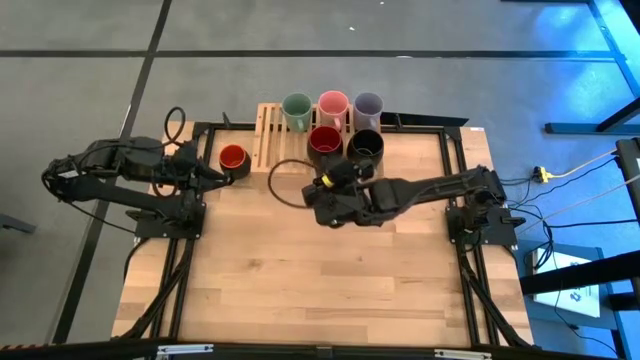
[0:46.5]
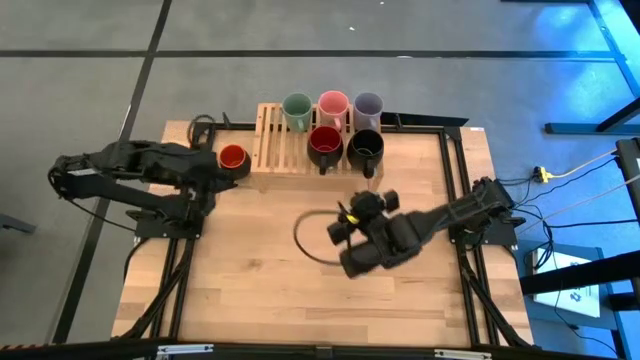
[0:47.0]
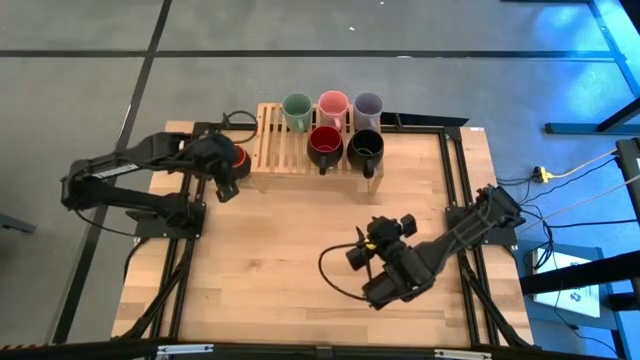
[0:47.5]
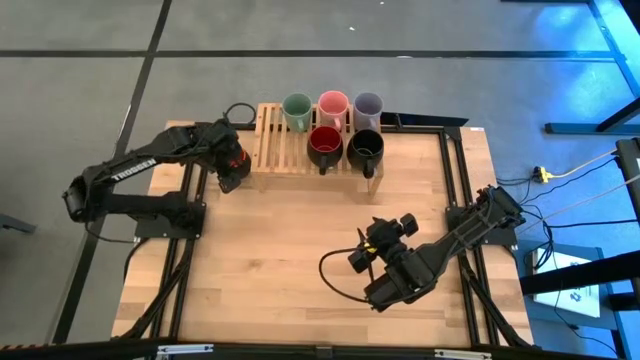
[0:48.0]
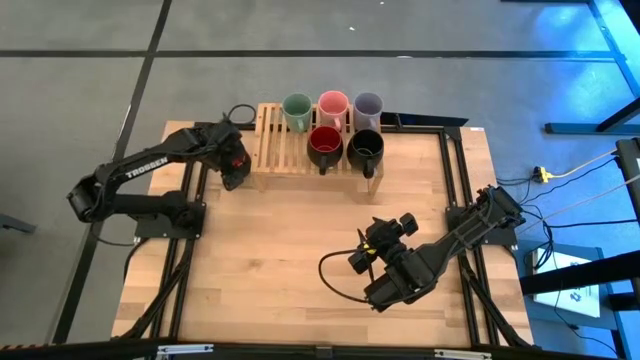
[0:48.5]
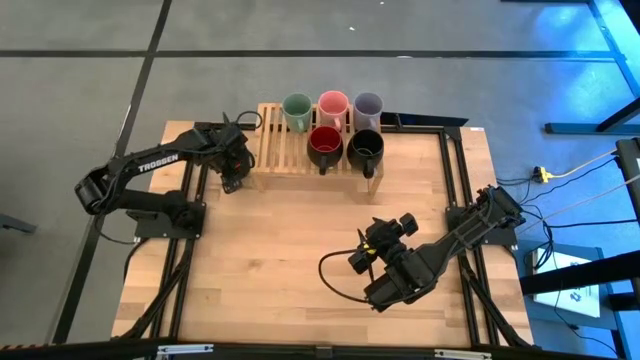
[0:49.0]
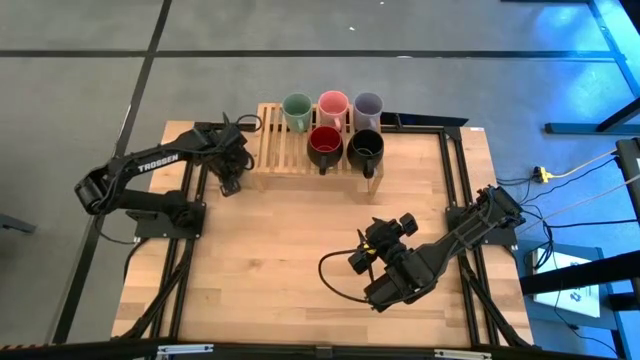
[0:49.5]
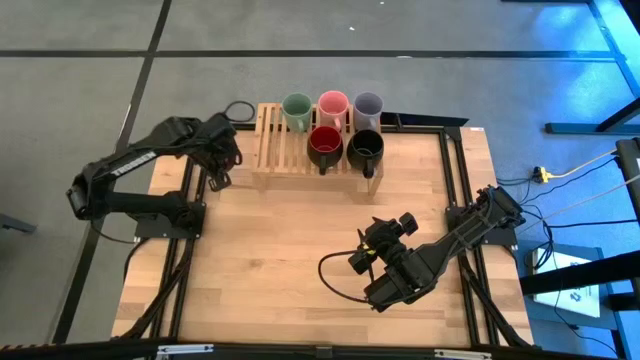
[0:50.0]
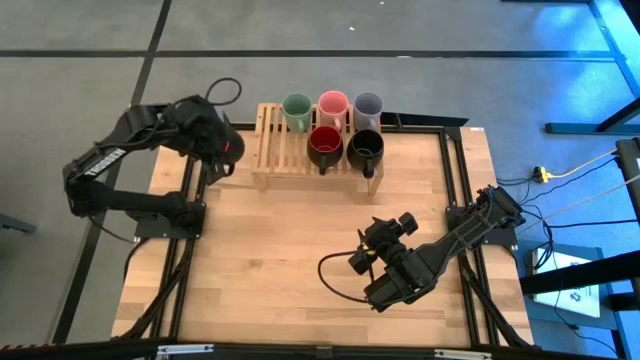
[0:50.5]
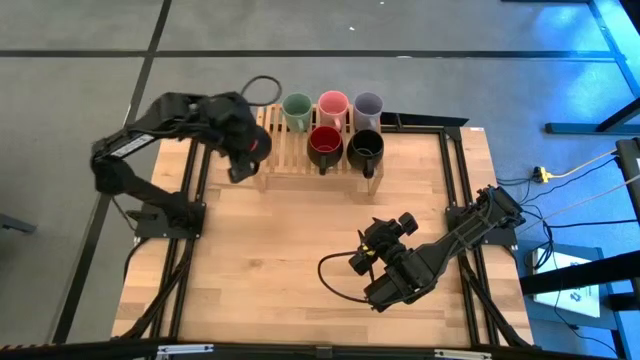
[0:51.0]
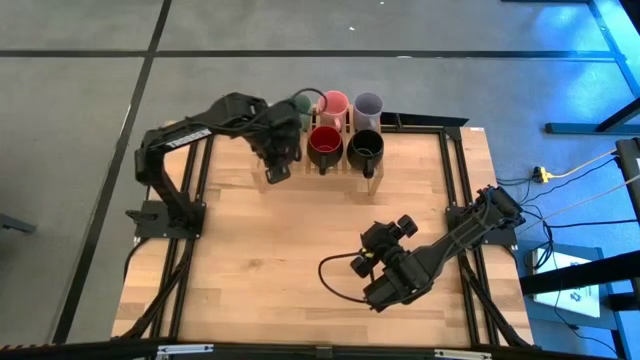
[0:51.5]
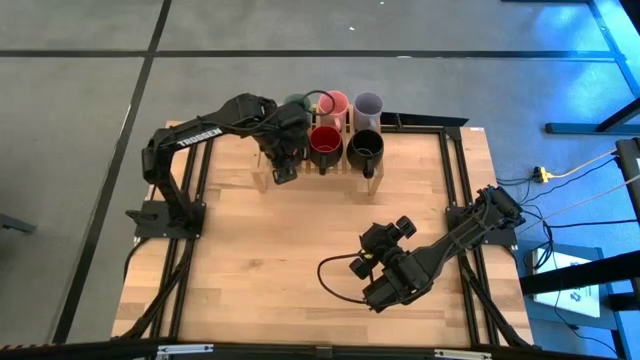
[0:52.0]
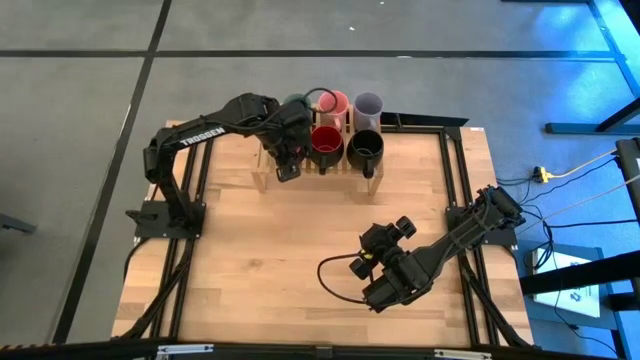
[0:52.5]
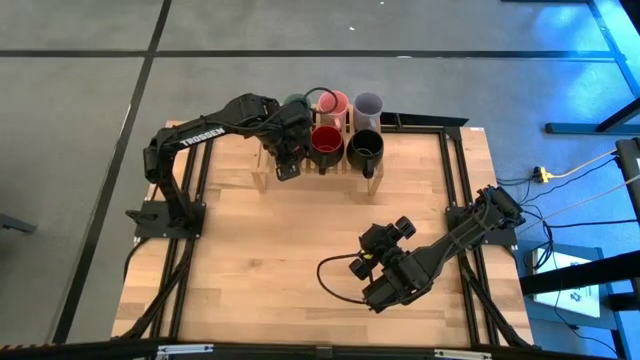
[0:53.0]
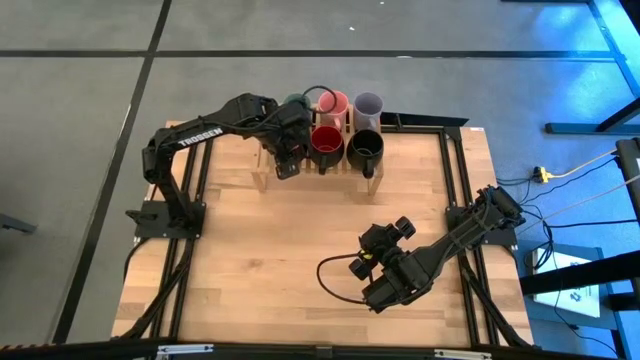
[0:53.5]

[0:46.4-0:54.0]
Task: Place coffee mugs
Put the black orange mug on the shelf

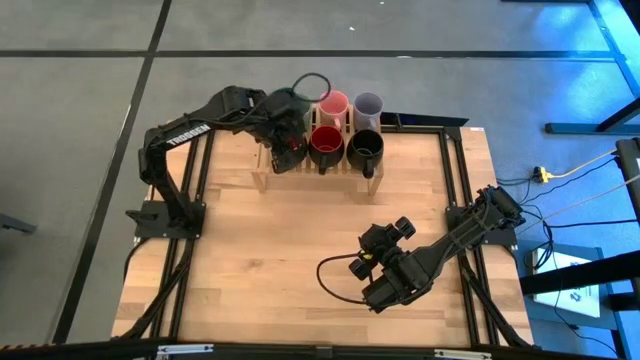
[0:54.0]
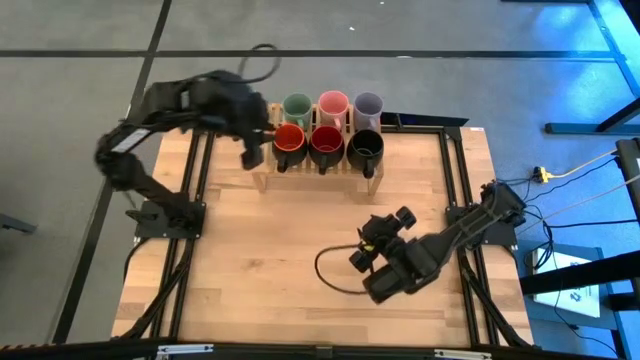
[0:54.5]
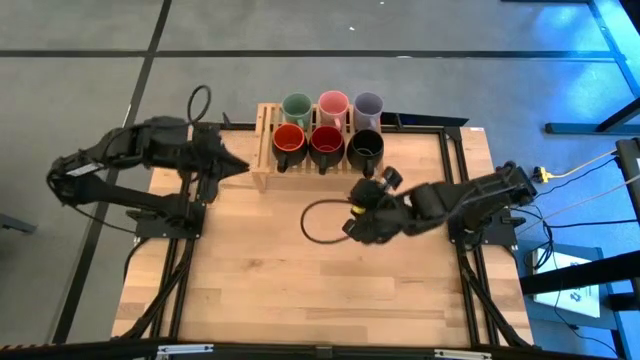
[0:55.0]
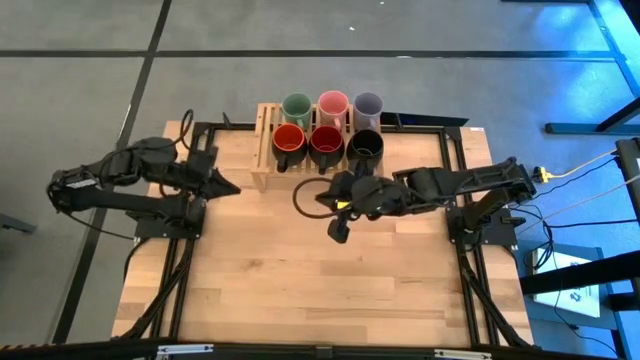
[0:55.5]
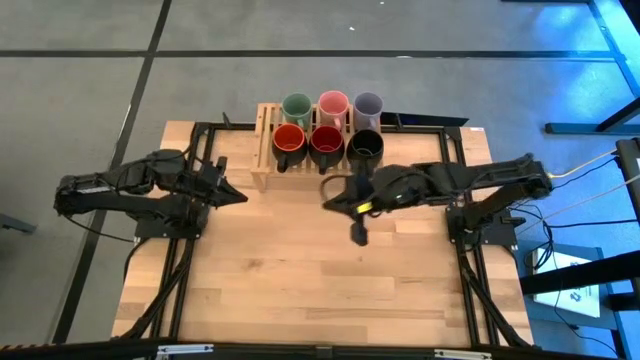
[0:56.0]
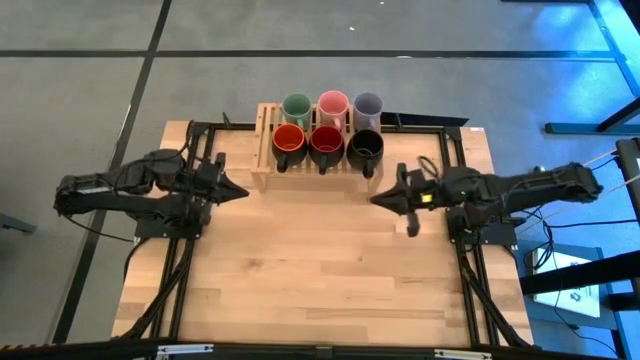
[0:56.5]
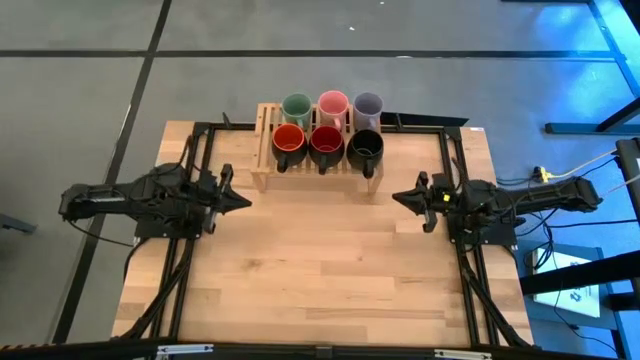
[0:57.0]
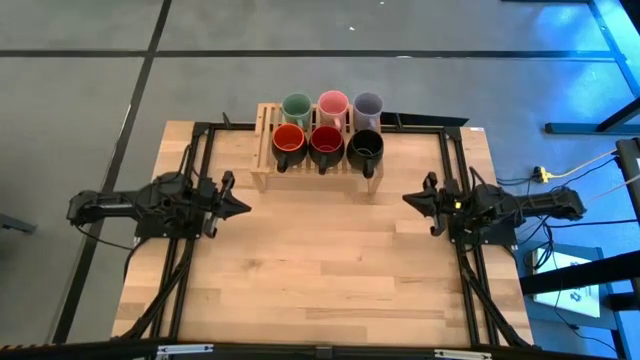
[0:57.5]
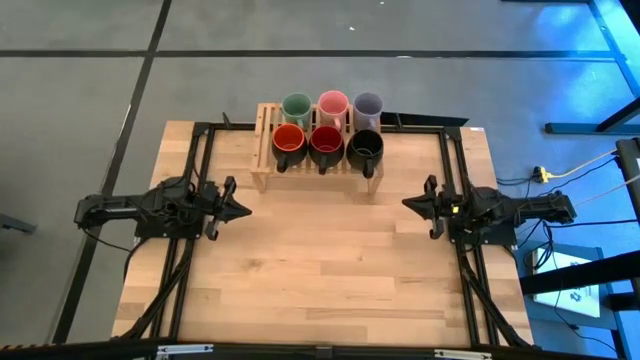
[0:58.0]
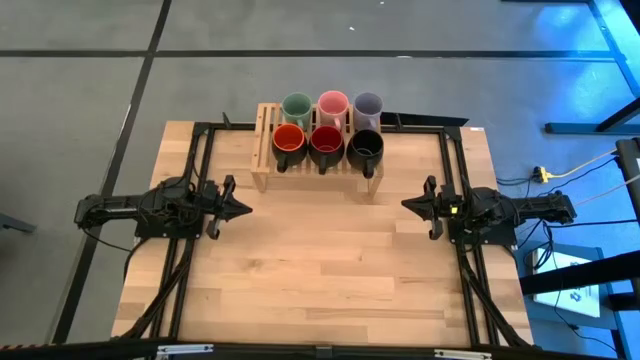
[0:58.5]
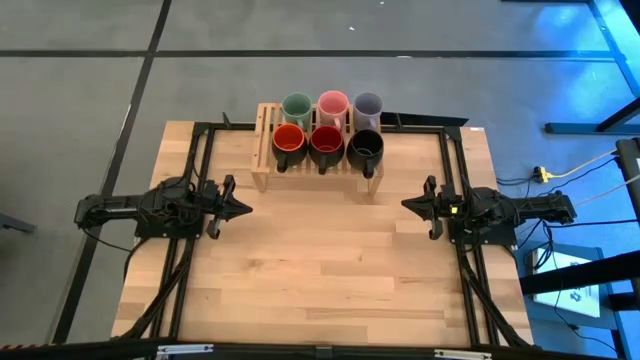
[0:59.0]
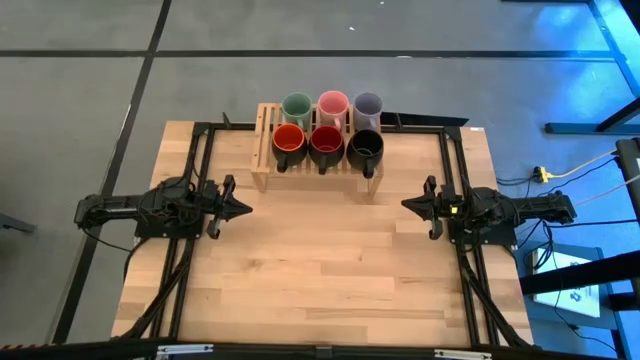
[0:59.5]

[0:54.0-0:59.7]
Return to Home Position

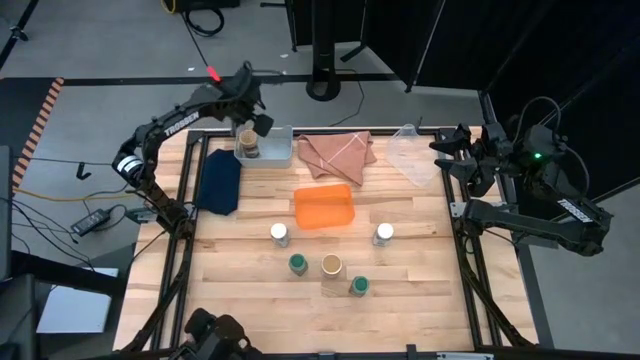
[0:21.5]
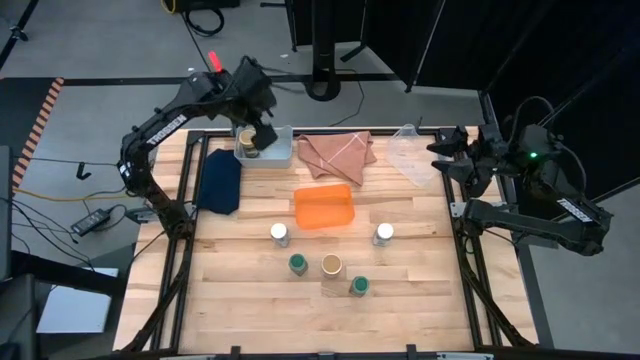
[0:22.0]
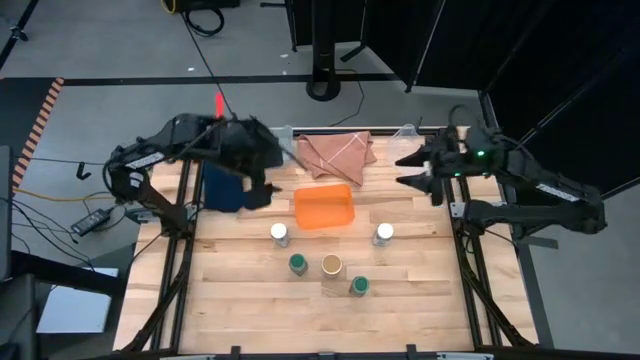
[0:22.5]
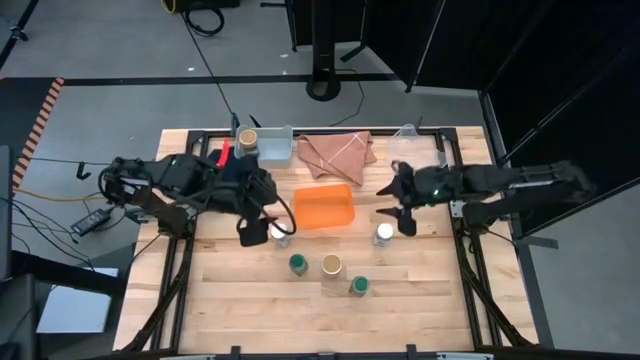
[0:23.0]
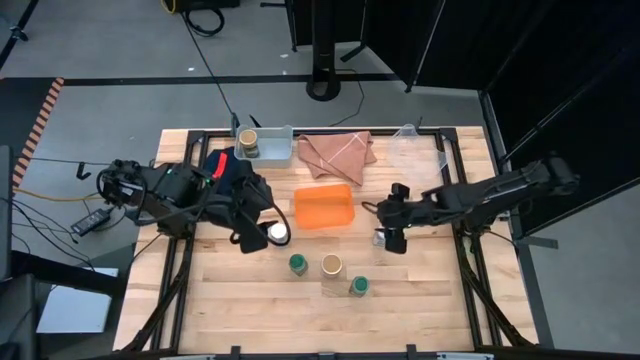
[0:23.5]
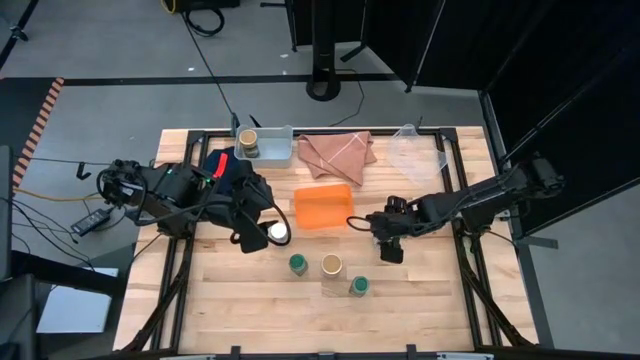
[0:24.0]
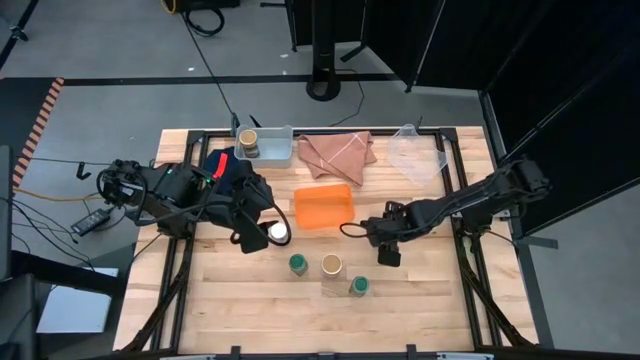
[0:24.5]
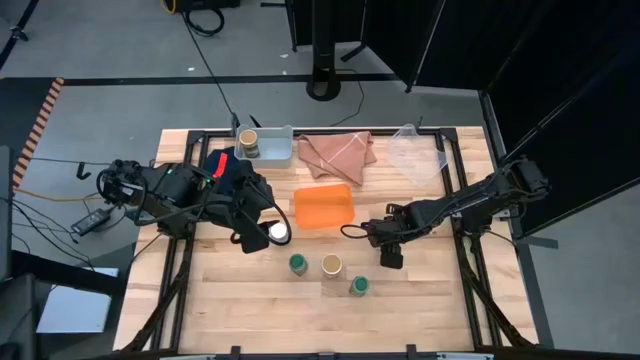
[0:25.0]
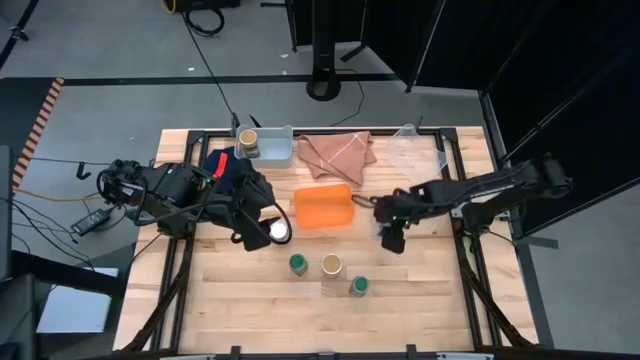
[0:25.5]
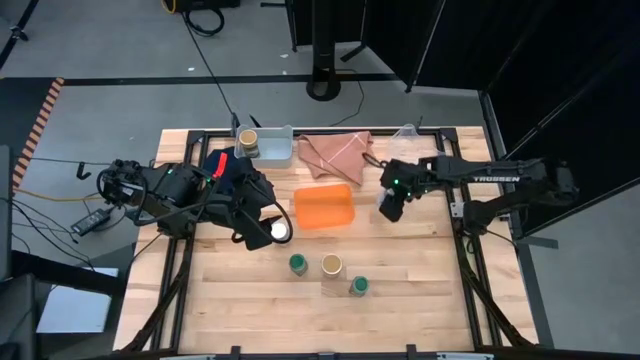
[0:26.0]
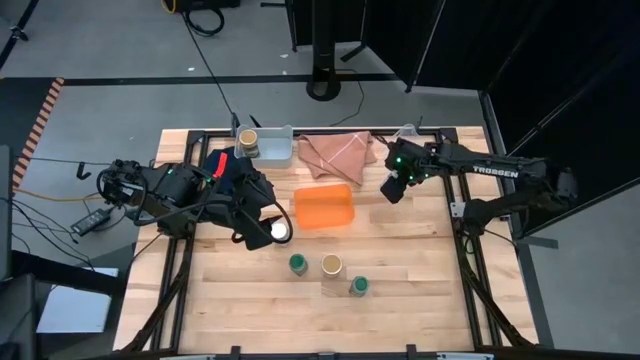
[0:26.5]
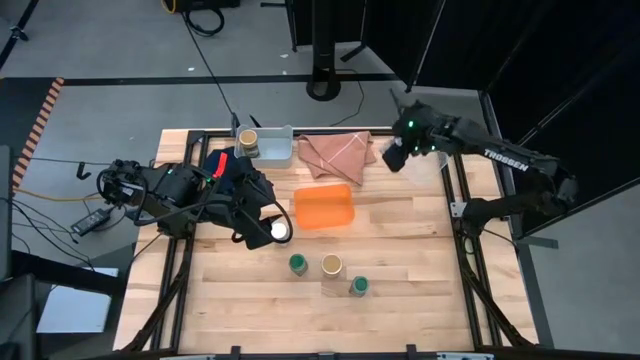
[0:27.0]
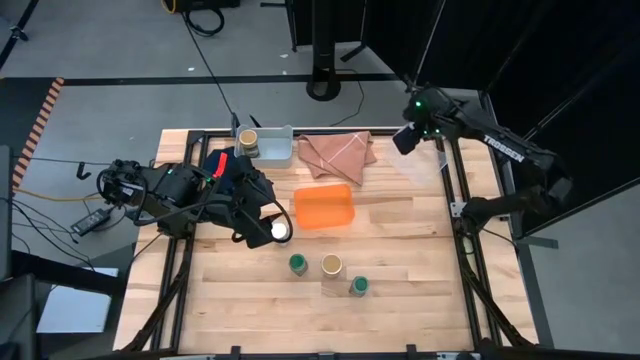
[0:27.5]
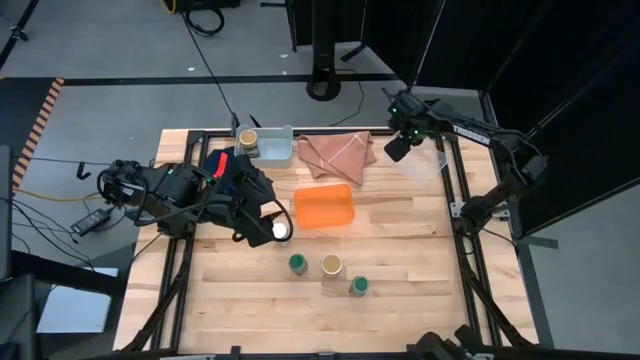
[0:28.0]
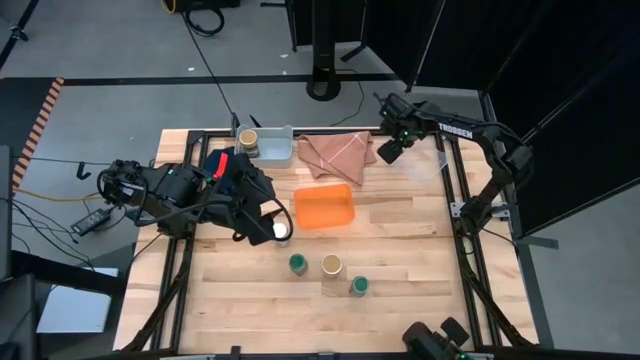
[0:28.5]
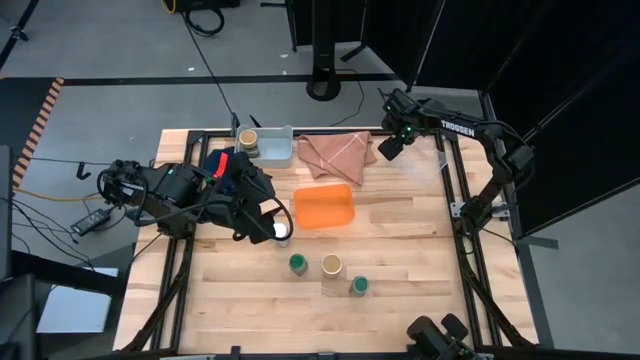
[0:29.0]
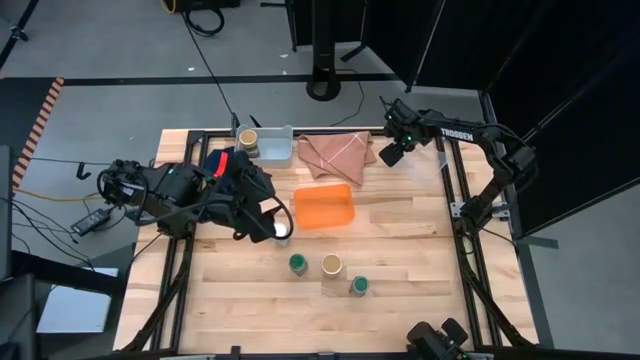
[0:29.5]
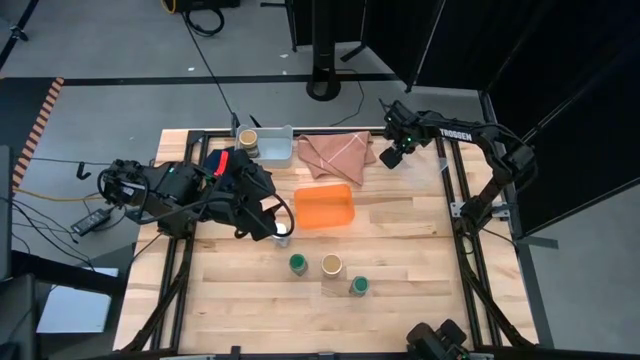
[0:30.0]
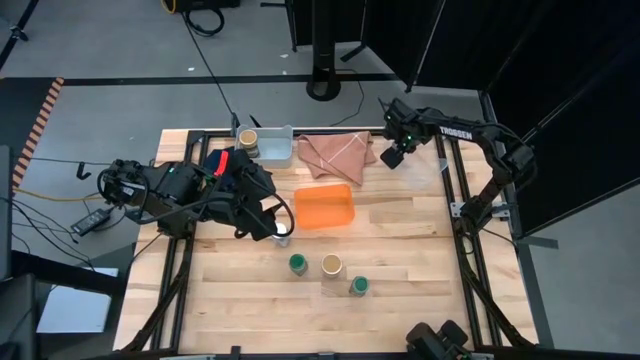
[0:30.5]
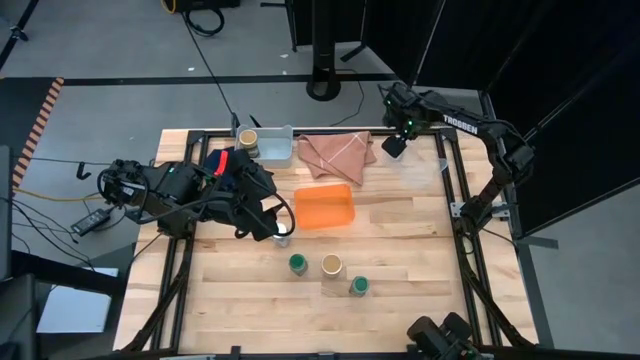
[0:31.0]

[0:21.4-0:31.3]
Task: Sort spices by type
Put the white seasoning bottle into the transparent bin
